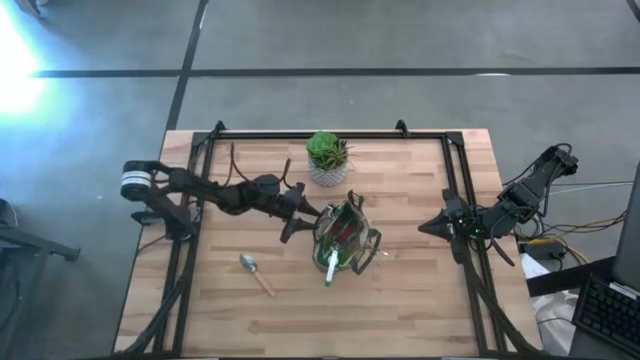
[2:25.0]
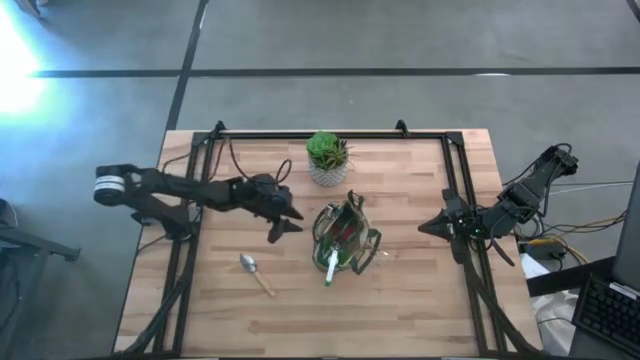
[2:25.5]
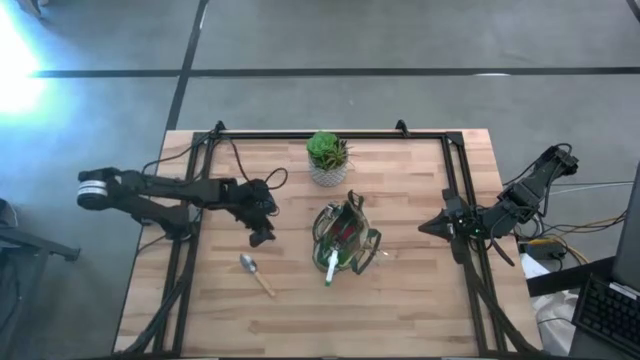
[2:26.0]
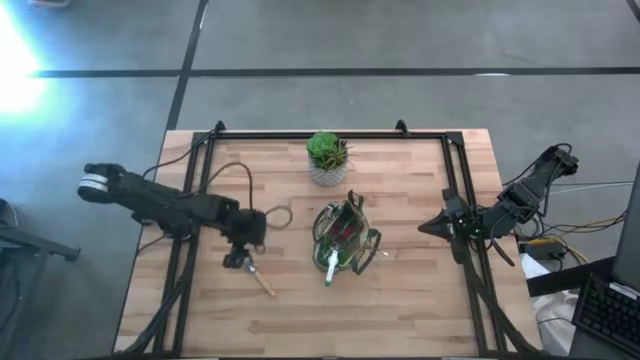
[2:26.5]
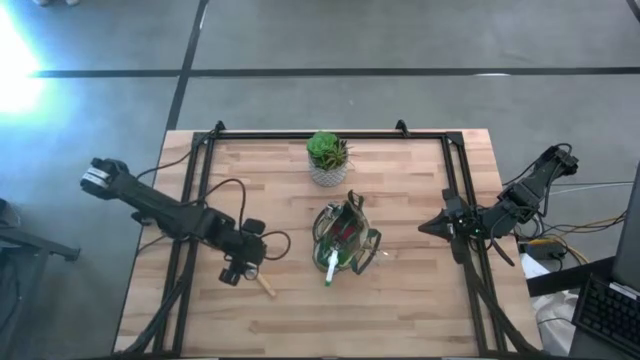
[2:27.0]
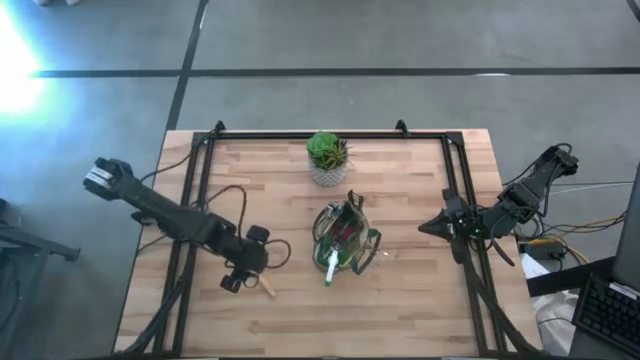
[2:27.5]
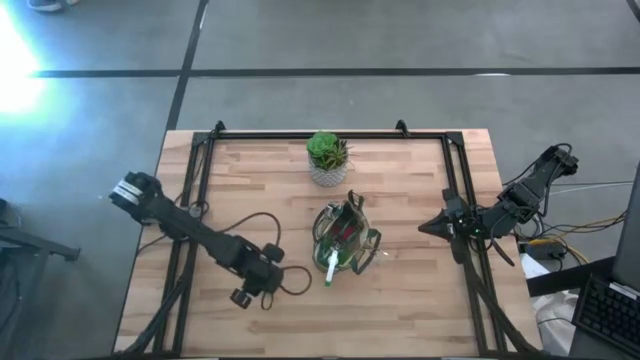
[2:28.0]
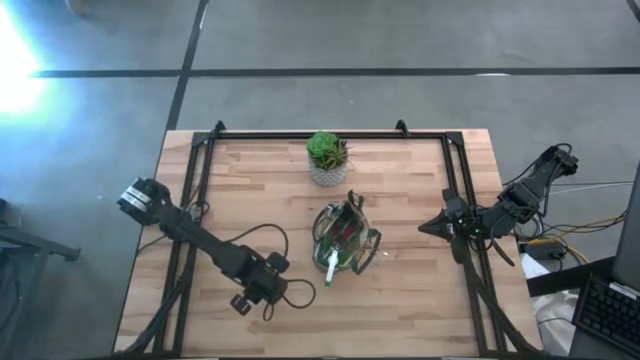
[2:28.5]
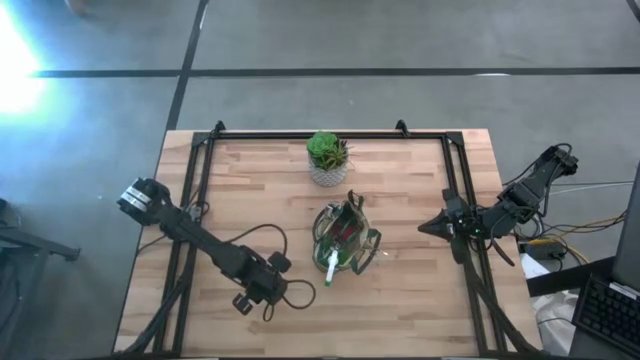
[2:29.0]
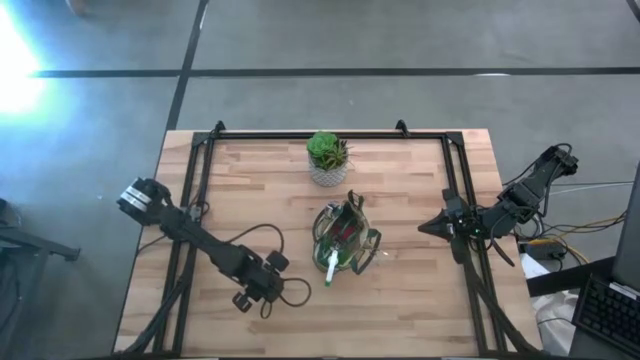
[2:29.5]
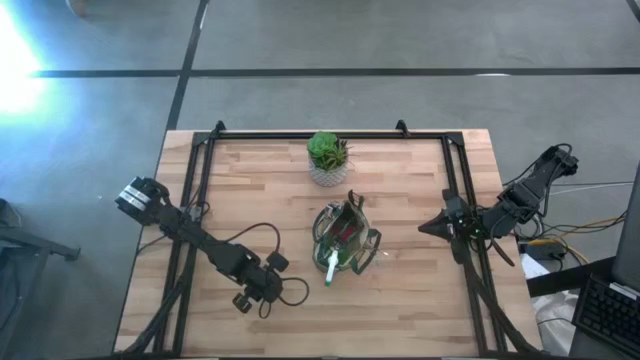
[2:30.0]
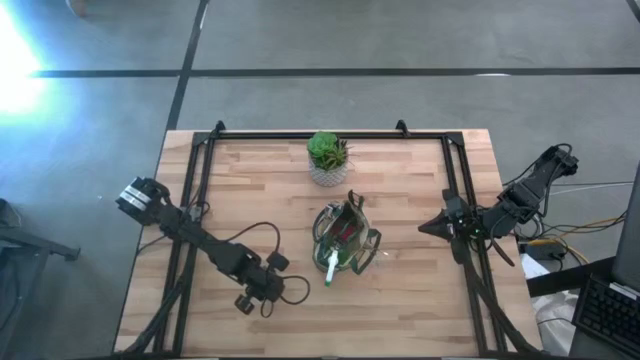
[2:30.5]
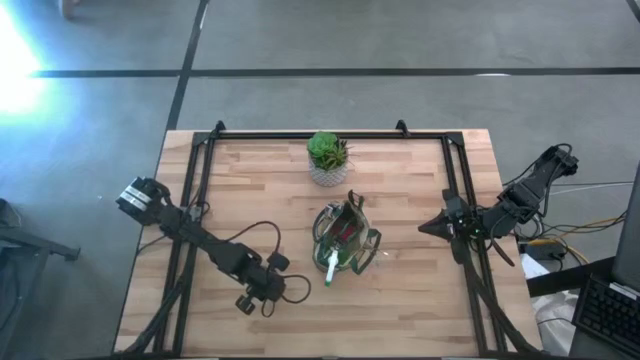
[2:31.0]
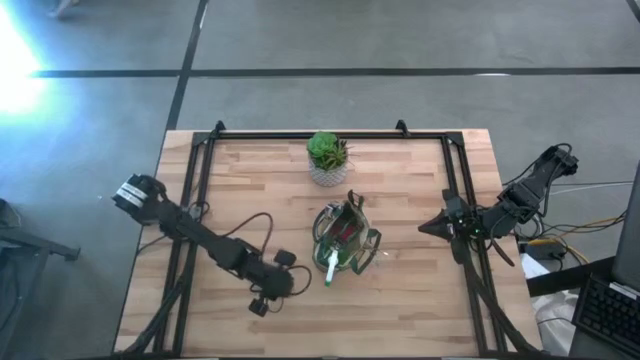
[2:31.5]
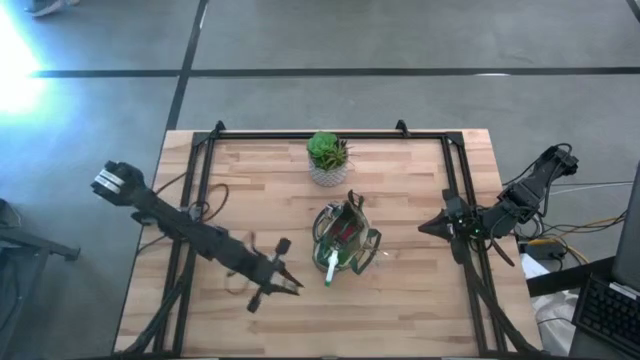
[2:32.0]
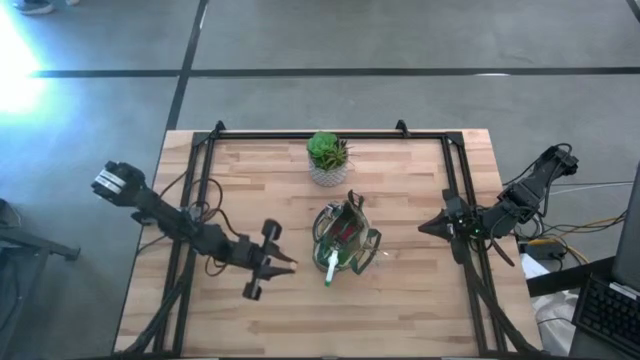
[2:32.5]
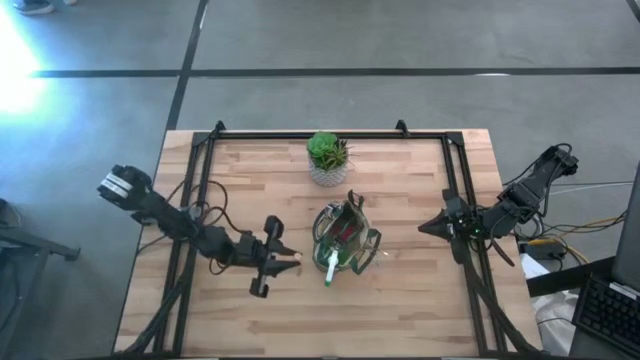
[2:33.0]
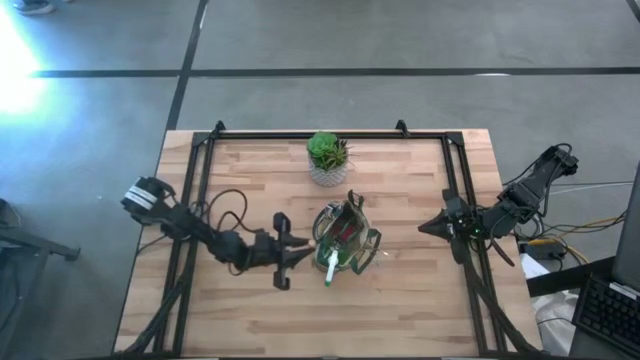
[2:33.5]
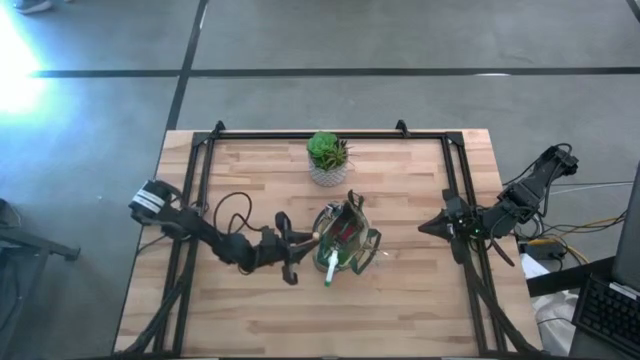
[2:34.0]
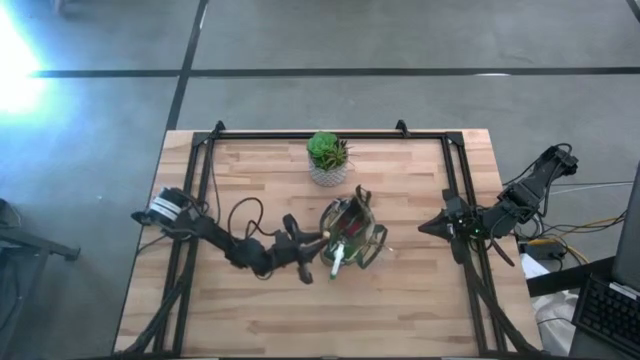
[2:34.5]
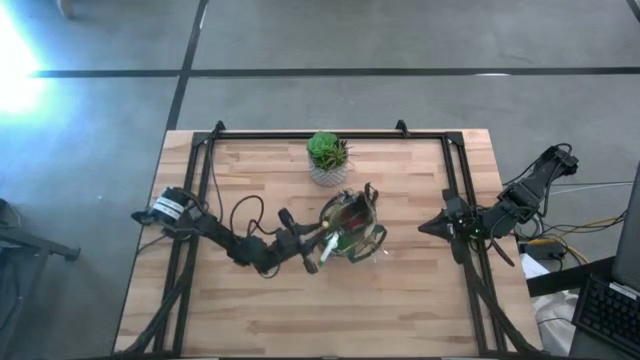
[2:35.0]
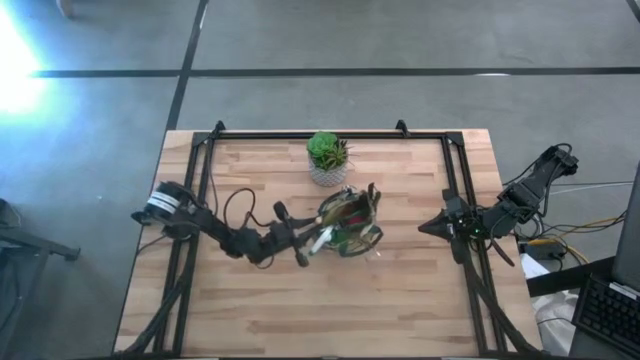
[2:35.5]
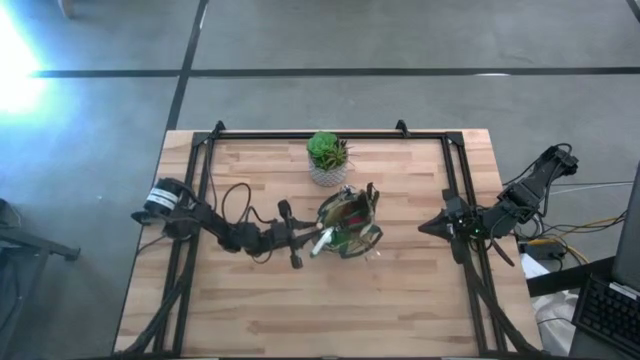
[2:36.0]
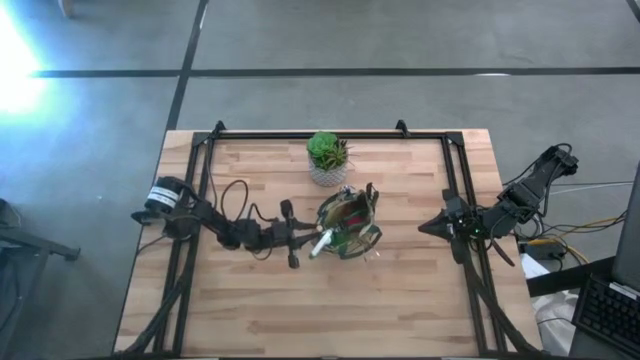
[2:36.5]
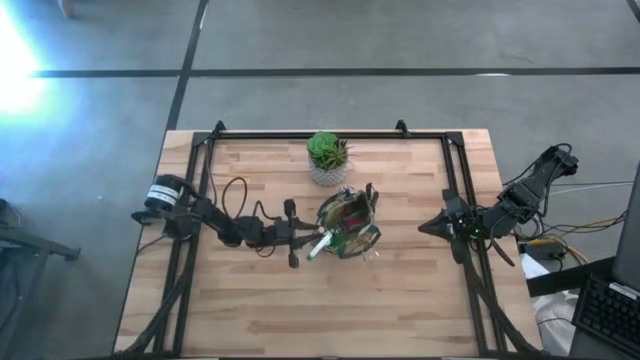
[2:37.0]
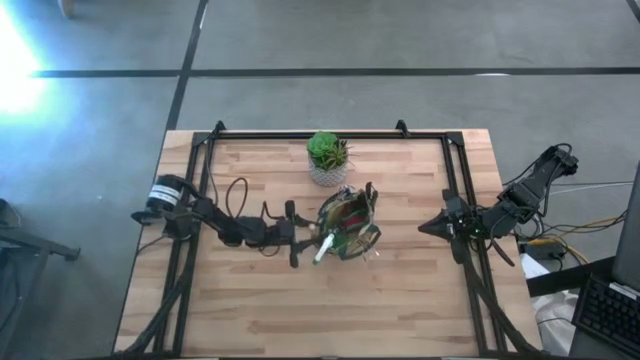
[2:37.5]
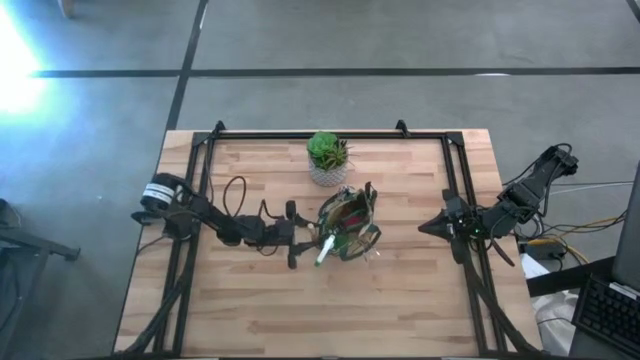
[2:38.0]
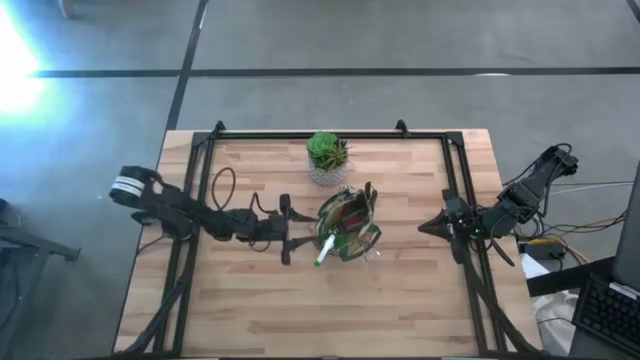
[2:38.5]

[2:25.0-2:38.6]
Task: Pick & Place Garden tools in Gardening bag
Put the brown trowel into the side pocket of the gardening bag

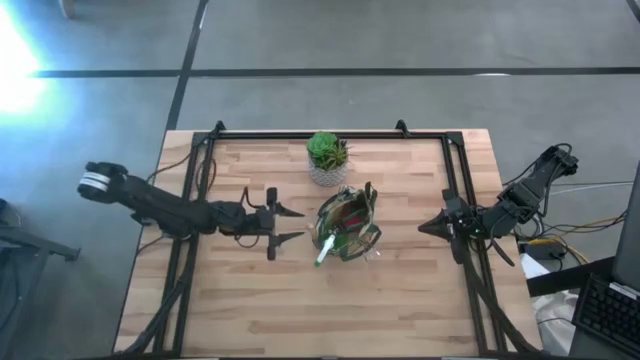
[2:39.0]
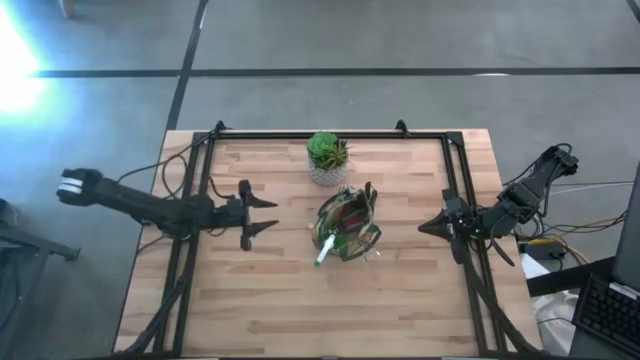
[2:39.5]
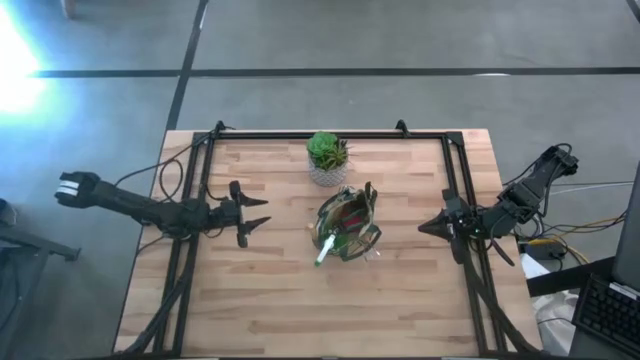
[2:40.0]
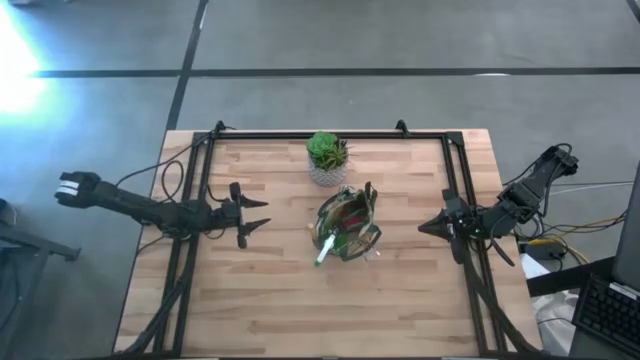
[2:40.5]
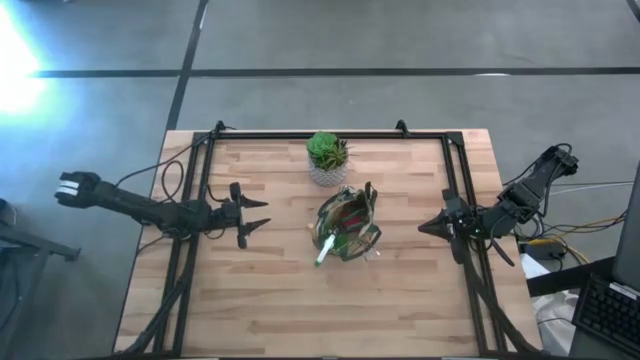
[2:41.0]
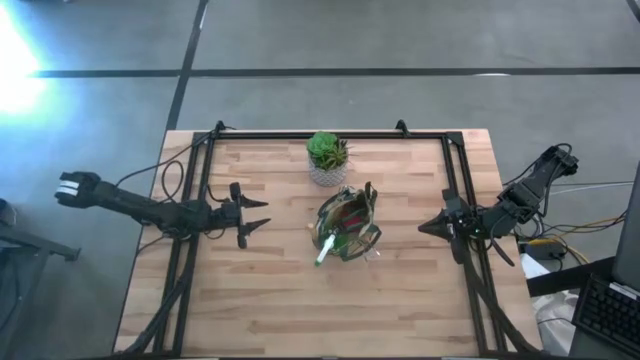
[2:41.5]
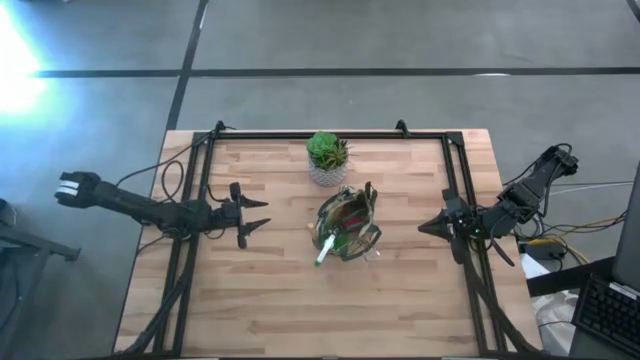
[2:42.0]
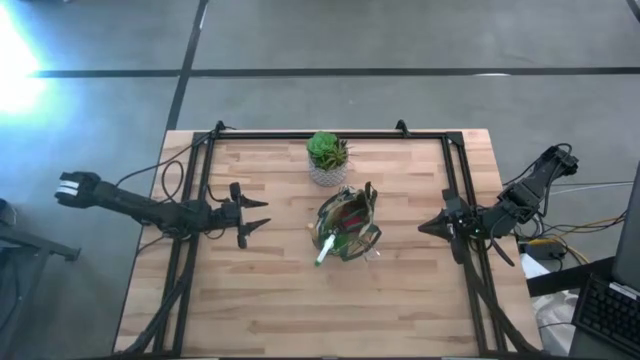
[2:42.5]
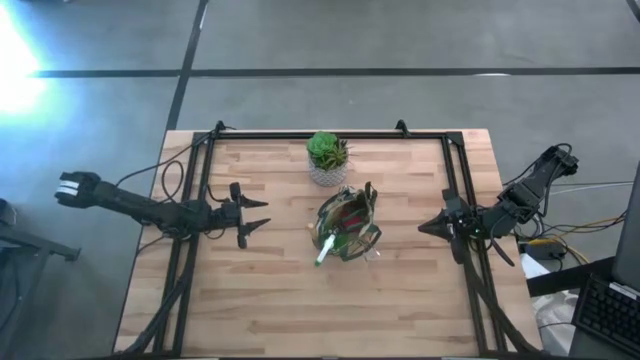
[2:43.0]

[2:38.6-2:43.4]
Return to Home Position

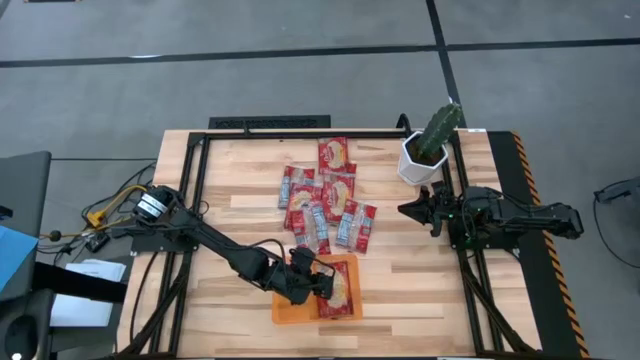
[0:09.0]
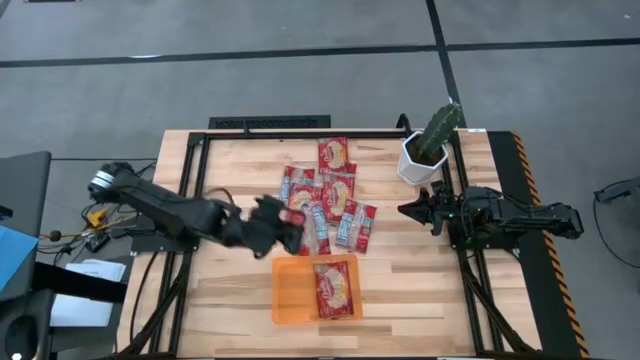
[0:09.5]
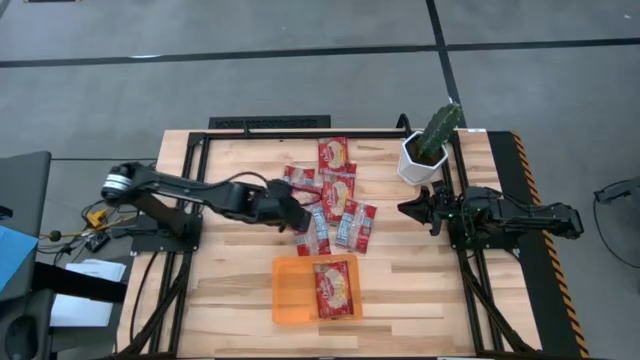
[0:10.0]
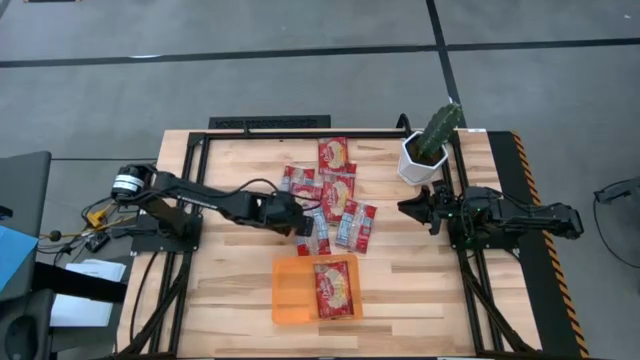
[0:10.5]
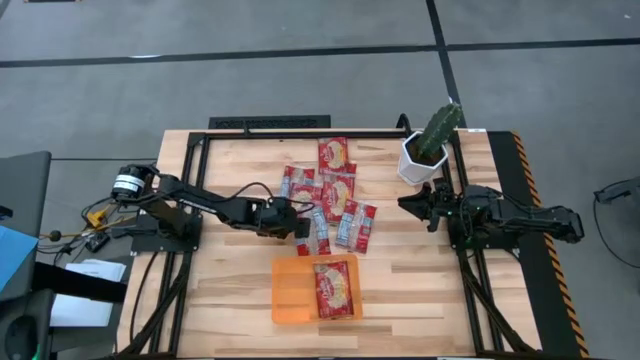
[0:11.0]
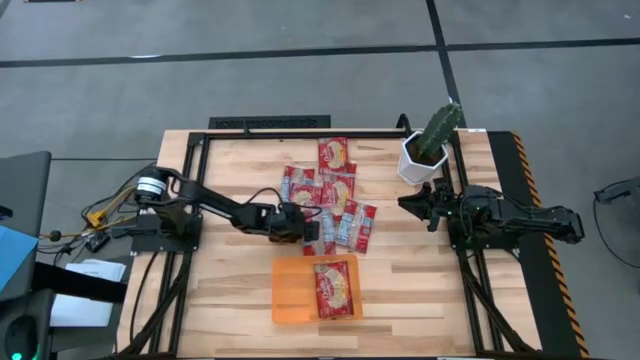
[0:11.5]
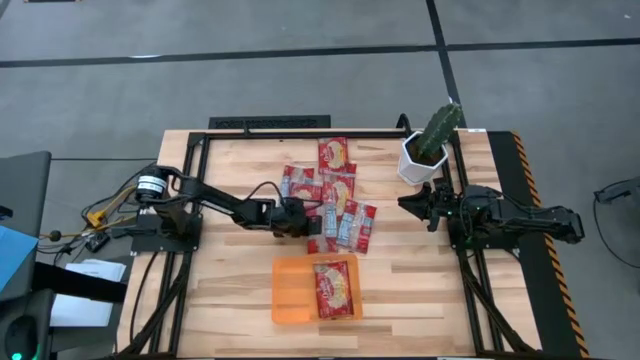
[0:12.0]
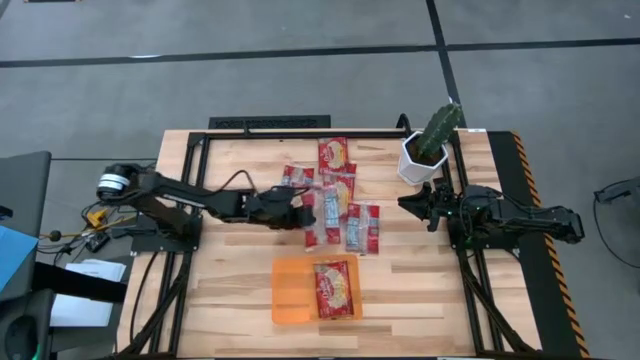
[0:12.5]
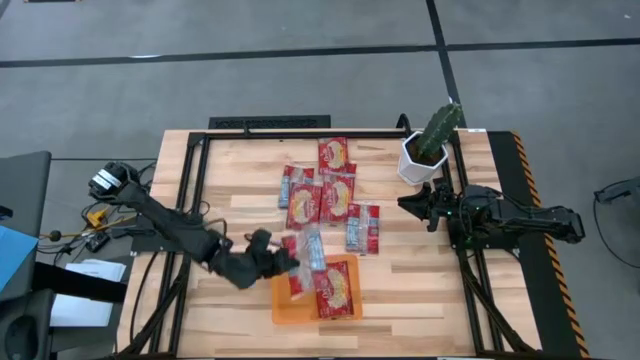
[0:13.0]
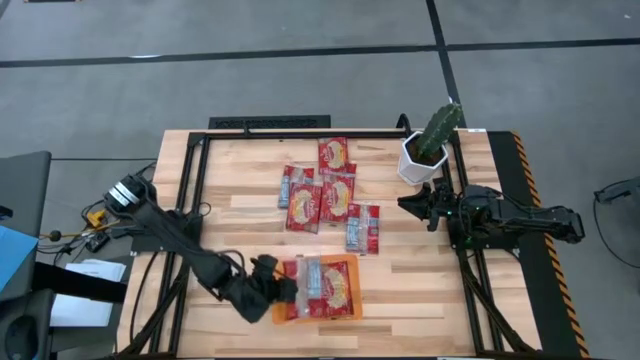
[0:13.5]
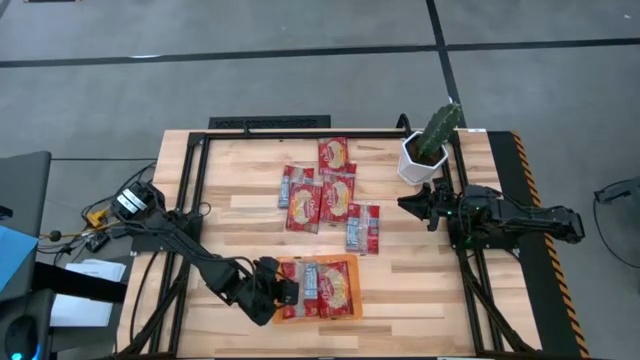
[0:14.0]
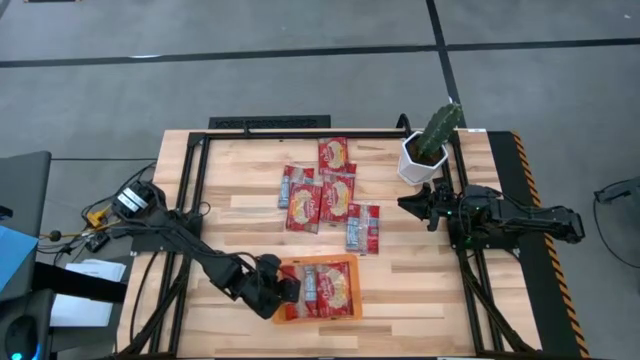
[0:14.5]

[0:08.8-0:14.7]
Task: Sort popcorn bags into baskets
Put the red popcorn bag into the orange bin
